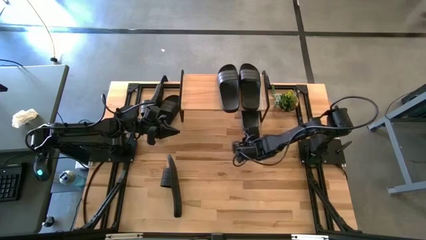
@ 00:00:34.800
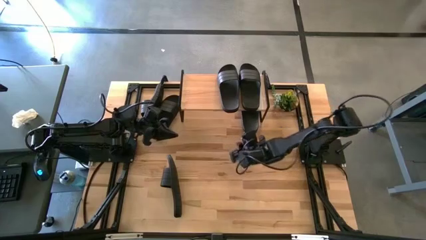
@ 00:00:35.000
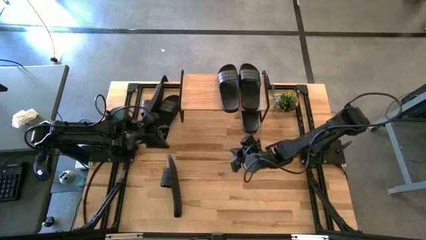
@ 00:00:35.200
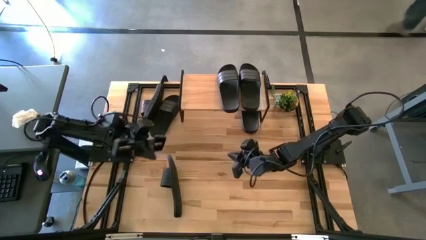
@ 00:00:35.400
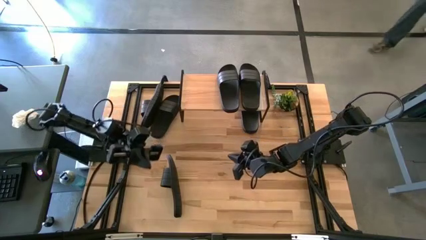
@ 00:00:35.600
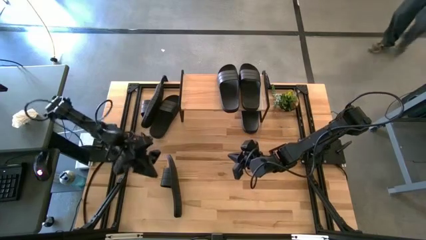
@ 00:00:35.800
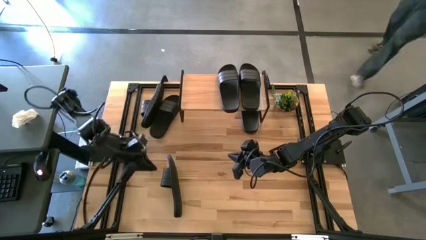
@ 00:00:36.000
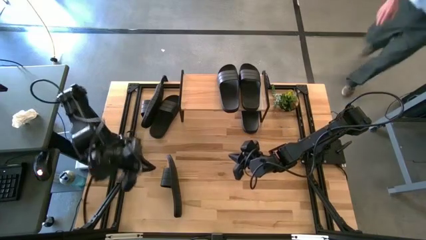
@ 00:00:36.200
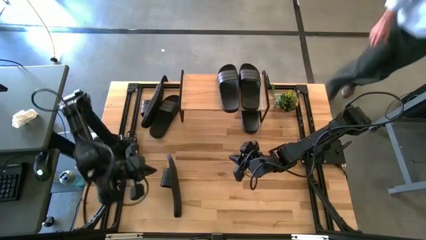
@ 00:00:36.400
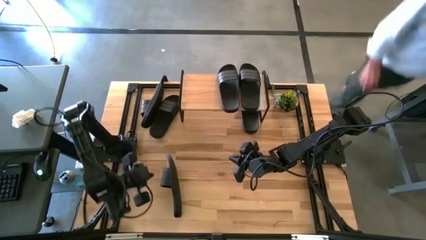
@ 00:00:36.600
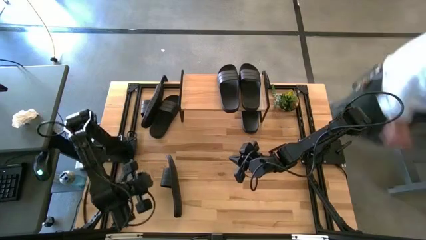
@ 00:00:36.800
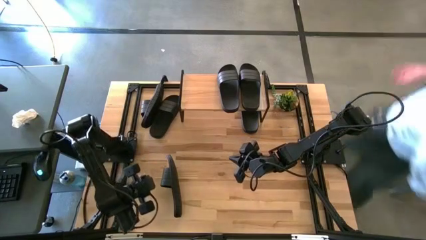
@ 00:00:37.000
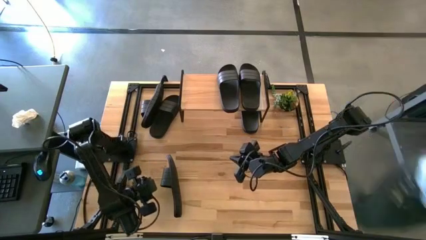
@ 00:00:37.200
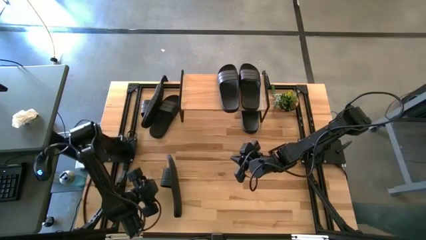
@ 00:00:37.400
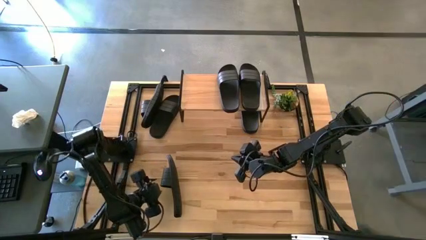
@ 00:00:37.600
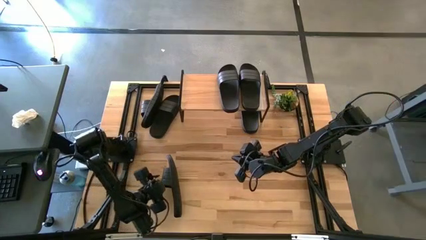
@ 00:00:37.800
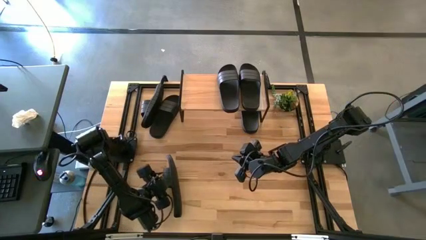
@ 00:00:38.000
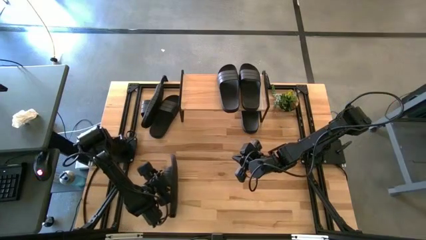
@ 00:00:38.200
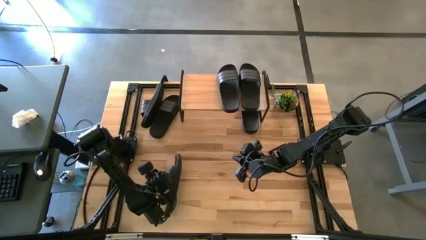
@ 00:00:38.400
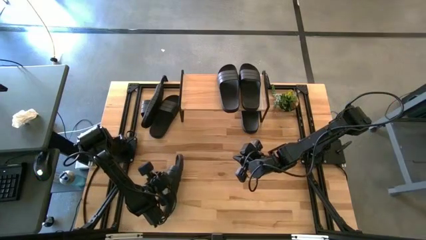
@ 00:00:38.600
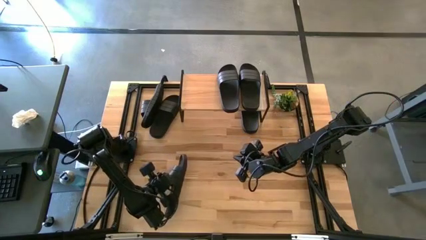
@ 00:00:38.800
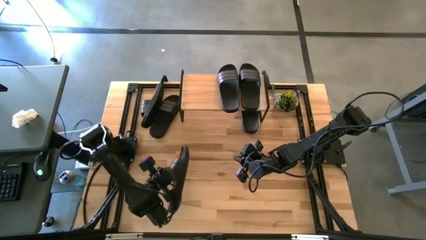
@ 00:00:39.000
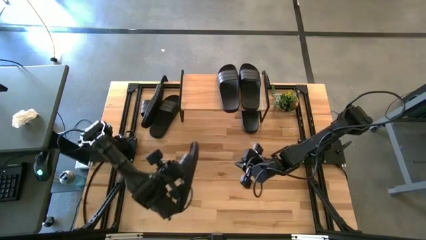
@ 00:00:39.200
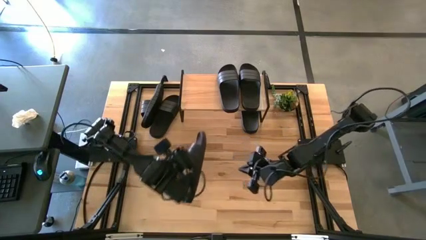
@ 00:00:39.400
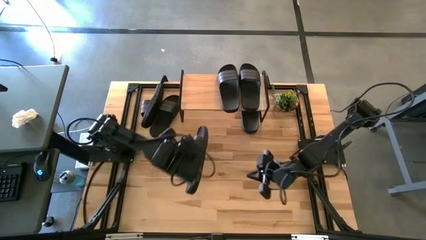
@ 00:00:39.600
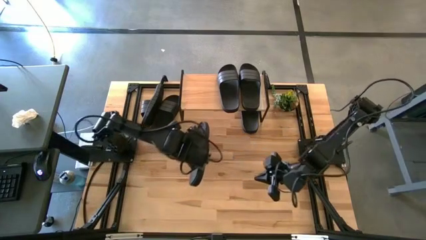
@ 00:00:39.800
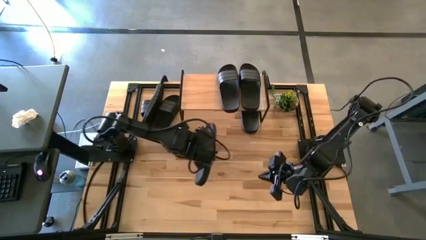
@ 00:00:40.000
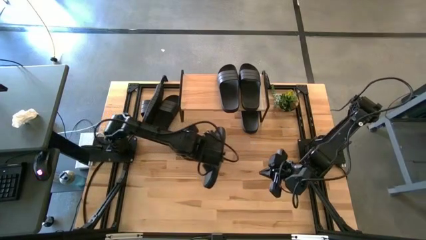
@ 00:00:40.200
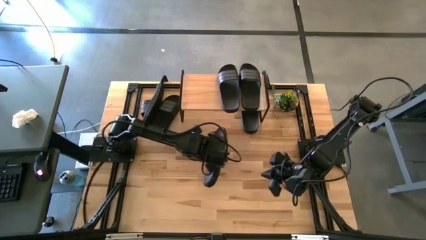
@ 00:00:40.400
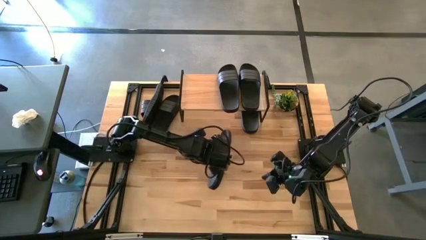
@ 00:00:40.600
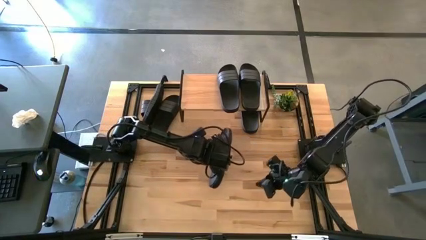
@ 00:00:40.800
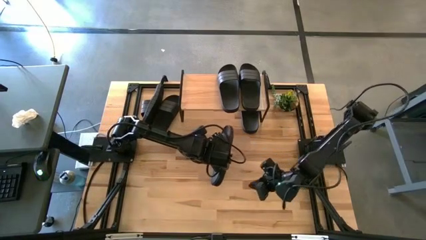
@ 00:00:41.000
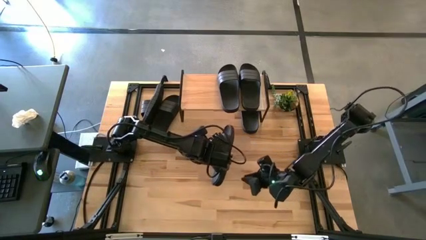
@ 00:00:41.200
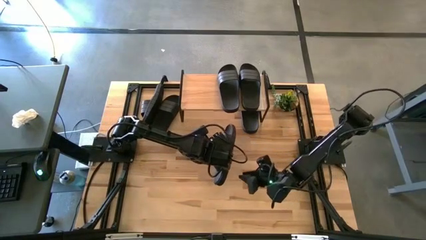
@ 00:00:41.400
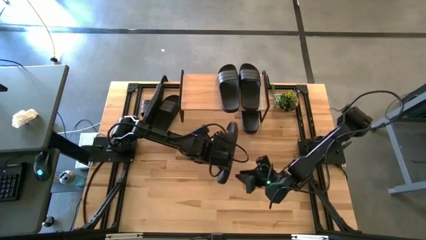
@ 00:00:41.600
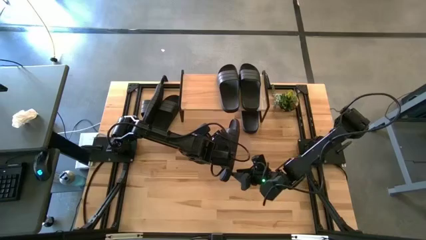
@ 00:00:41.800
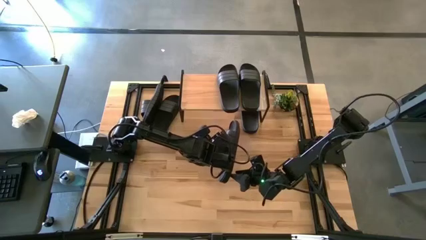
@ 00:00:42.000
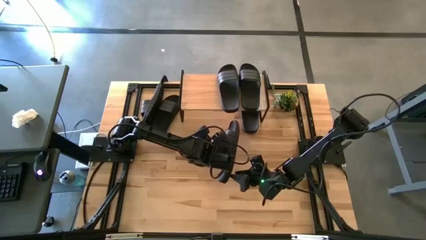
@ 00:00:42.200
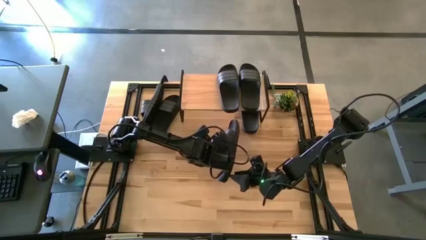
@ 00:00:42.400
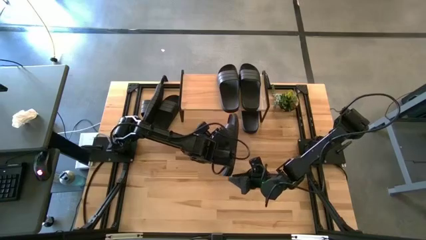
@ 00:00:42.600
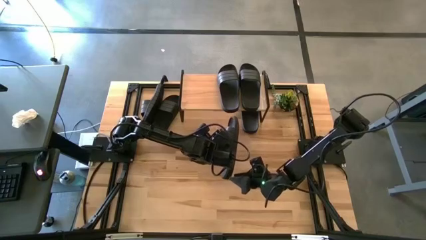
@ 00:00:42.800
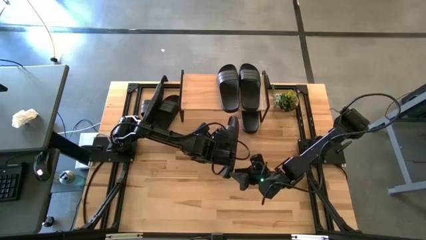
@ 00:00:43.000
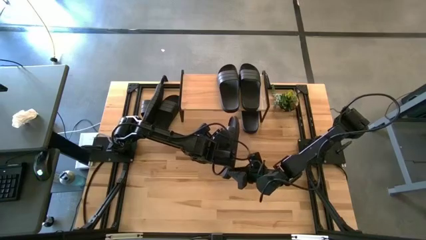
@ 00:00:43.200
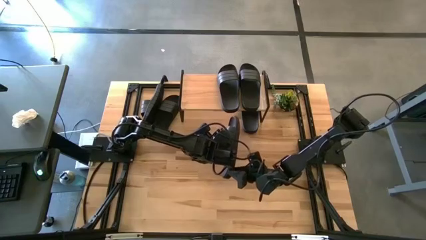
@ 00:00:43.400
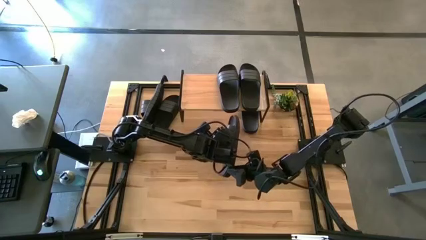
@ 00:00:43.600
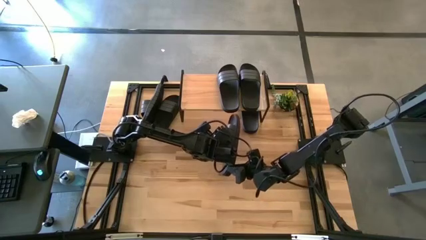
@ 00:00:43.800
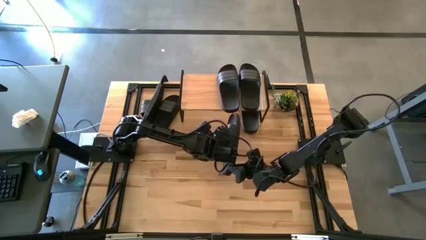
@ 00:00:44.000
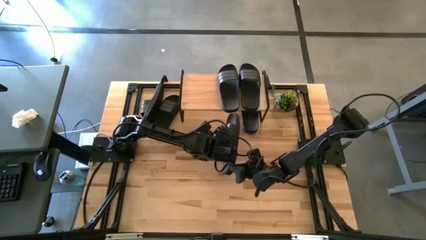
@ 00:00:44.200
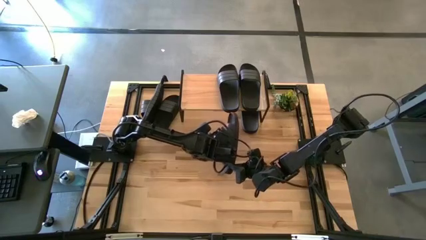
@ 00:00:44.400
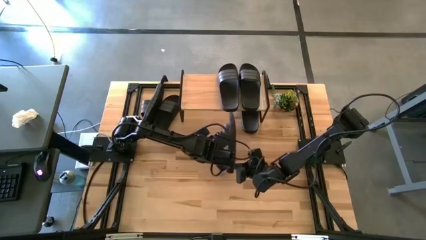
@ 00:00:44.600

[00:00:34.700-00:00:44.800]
Task: Pick and place slides into the shelf
Put the black slipper under the shelf
